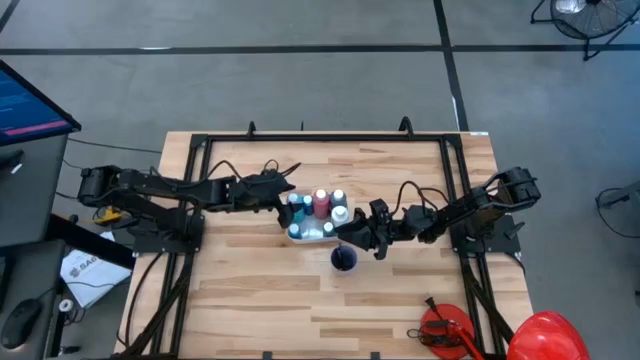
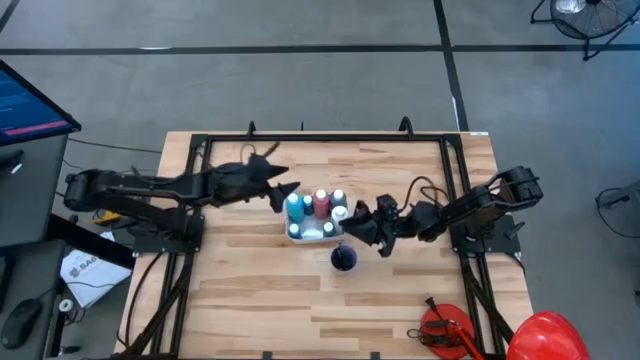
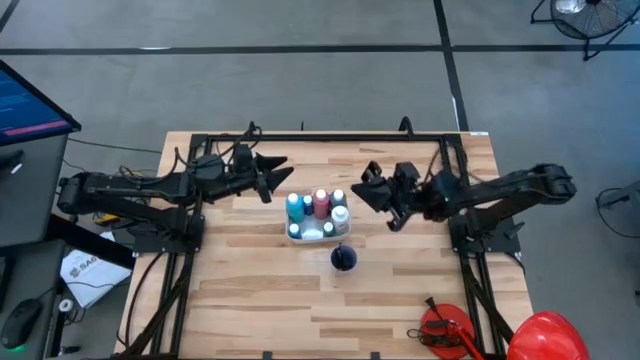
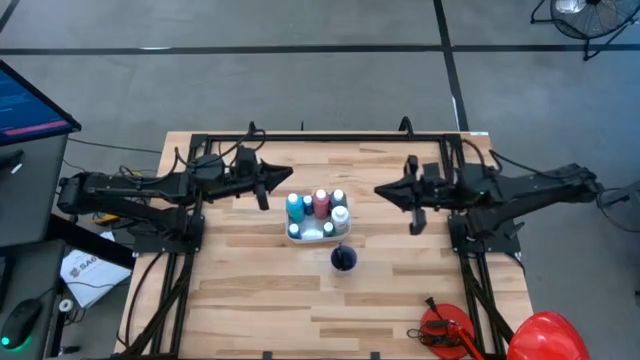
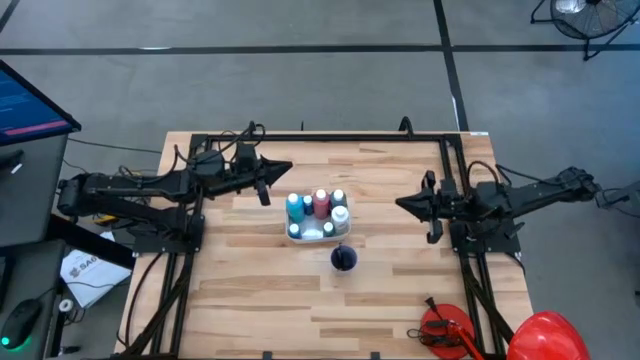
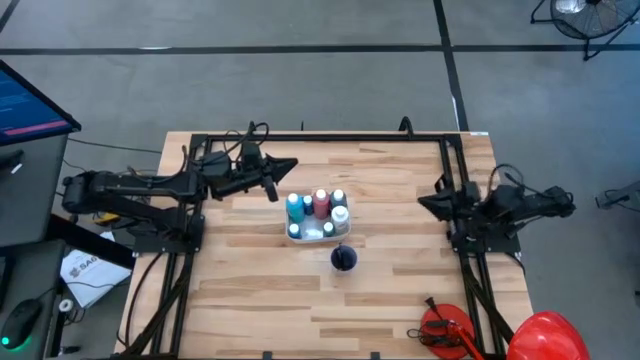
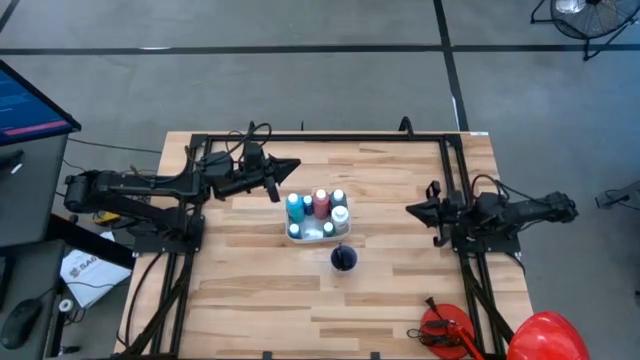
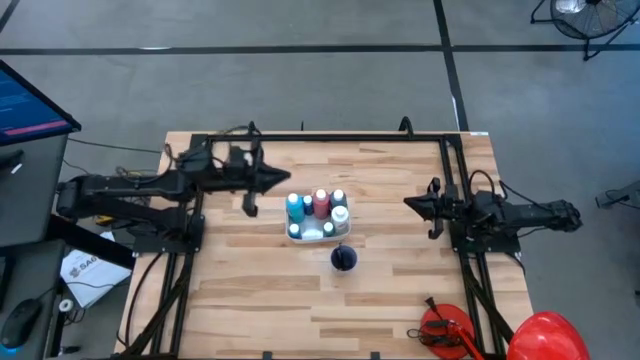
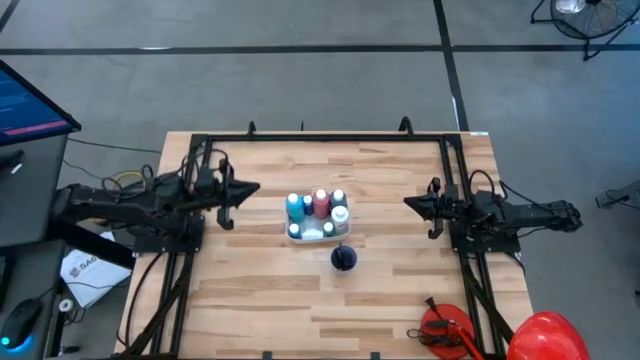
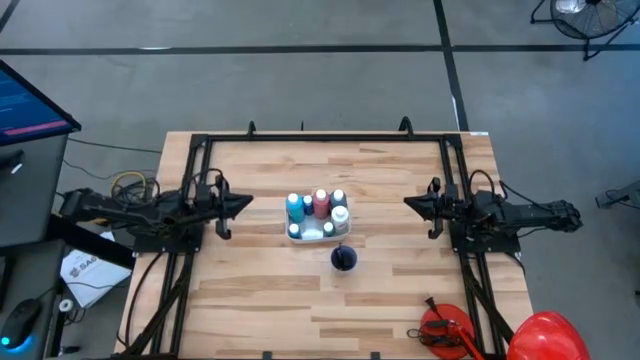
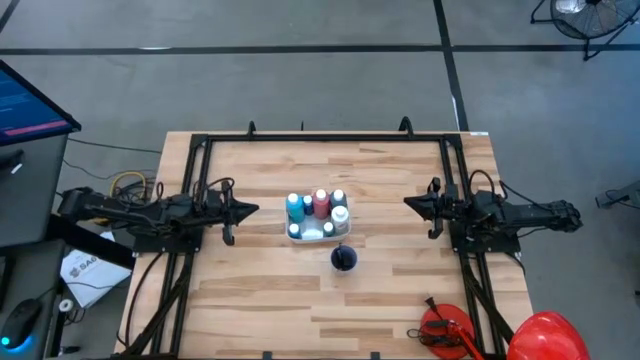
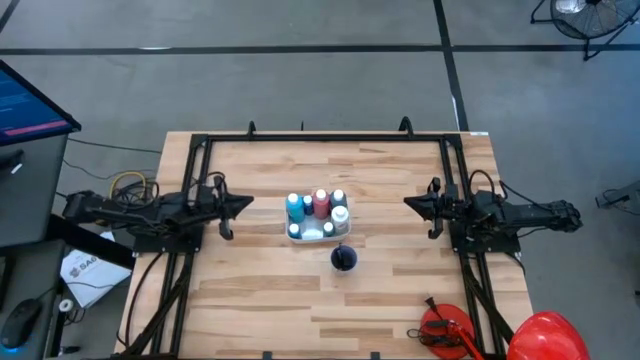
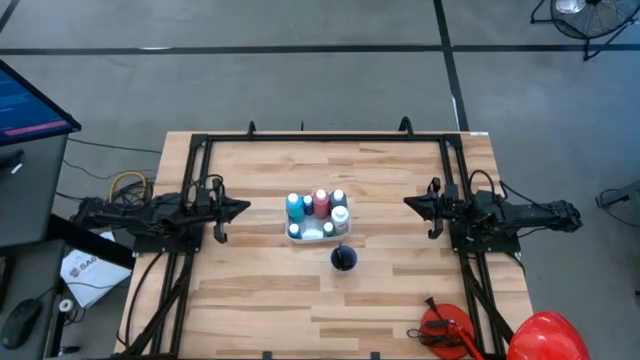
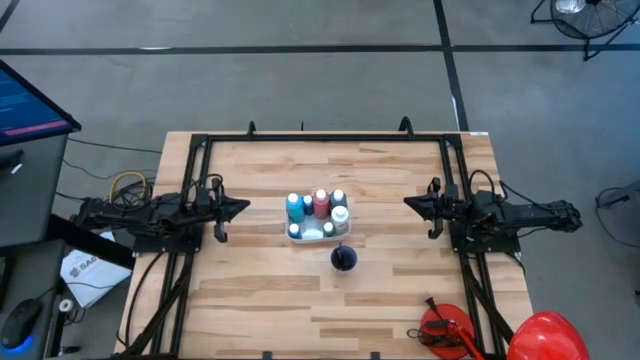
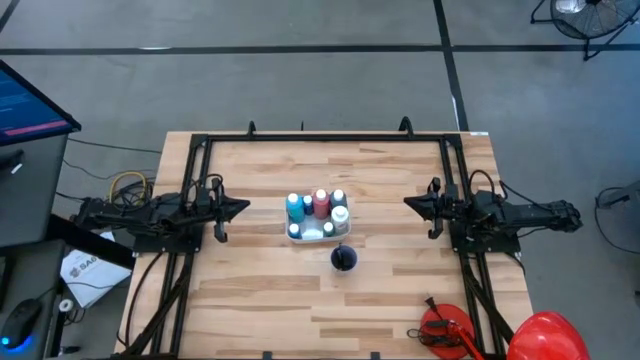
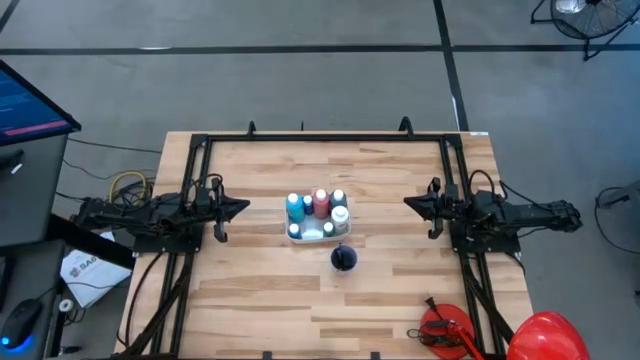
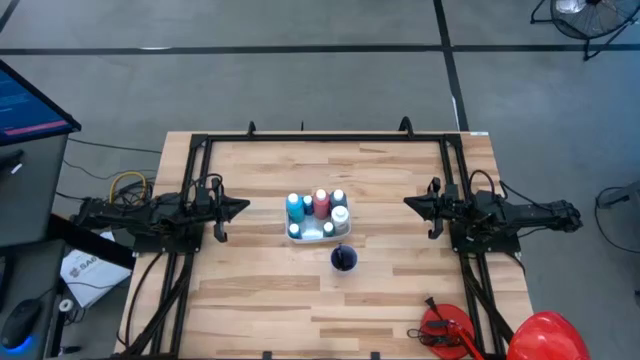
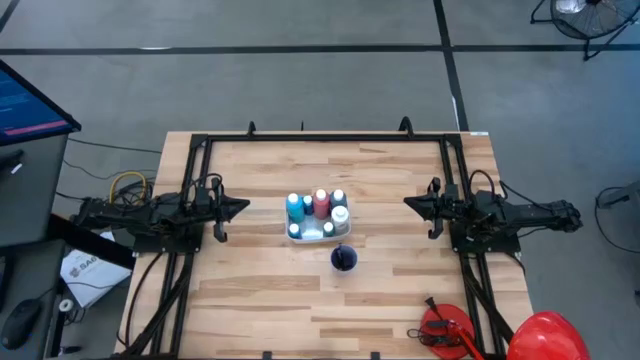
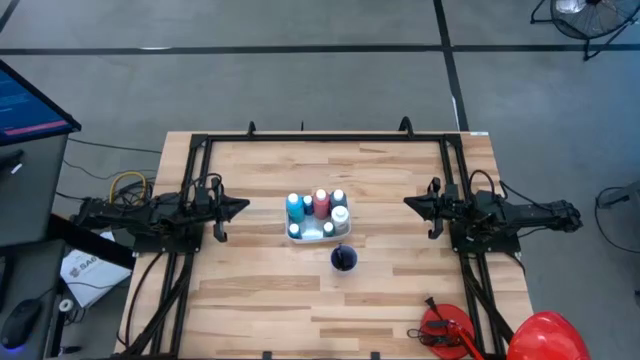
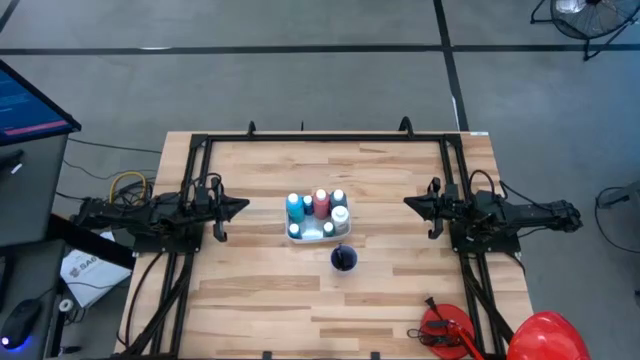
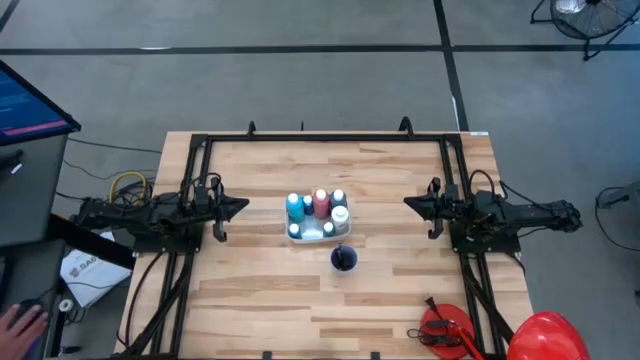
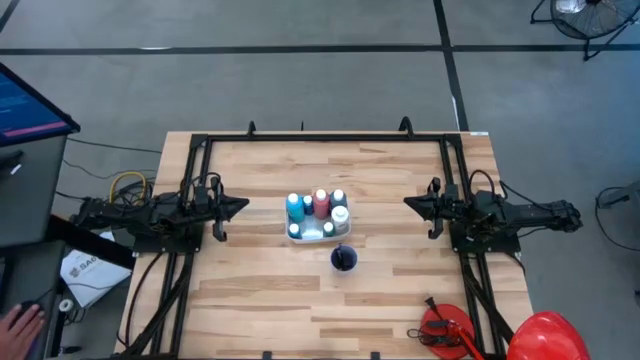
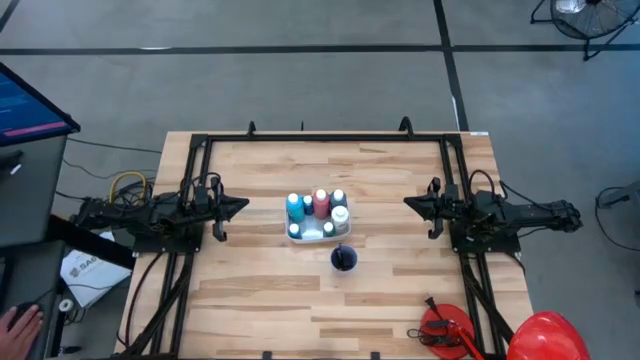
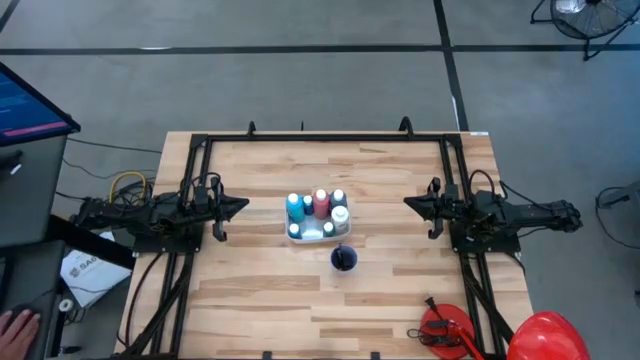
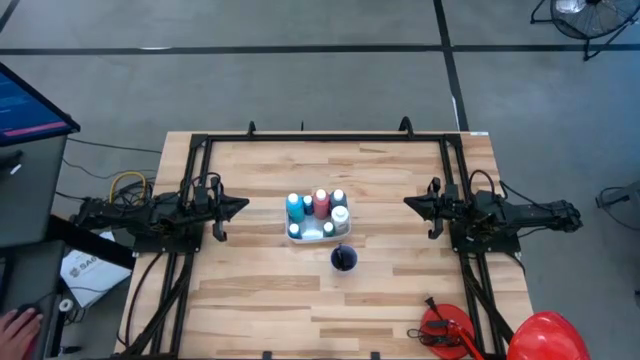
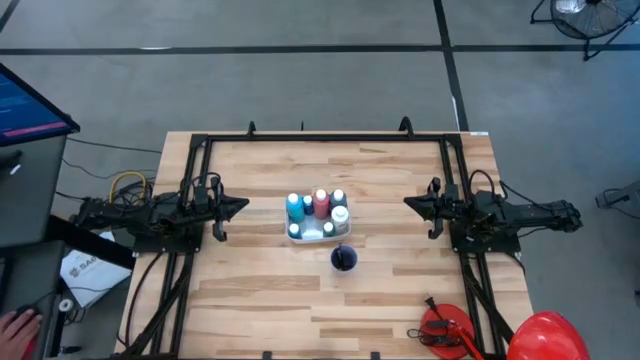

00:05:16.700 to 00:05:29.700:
Task: Pick & Place Paint Supplies
Return to Home Position

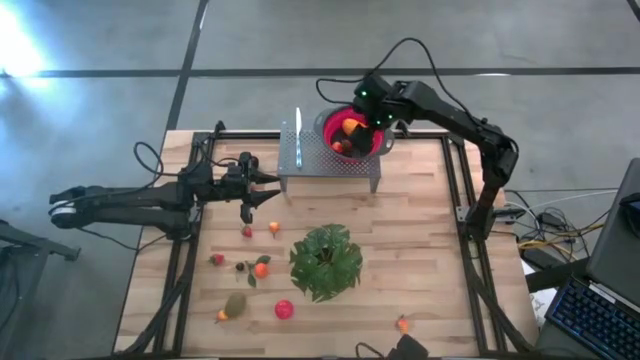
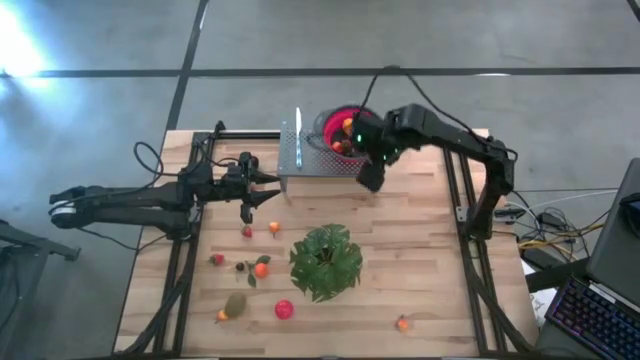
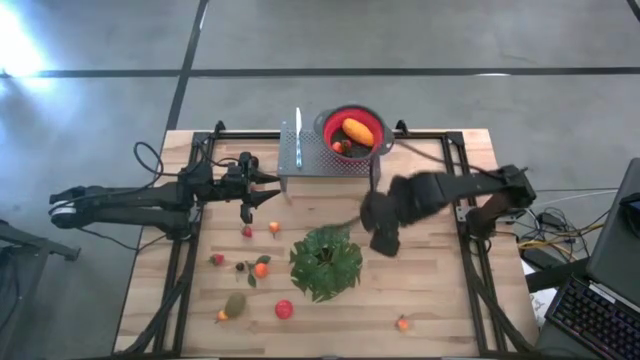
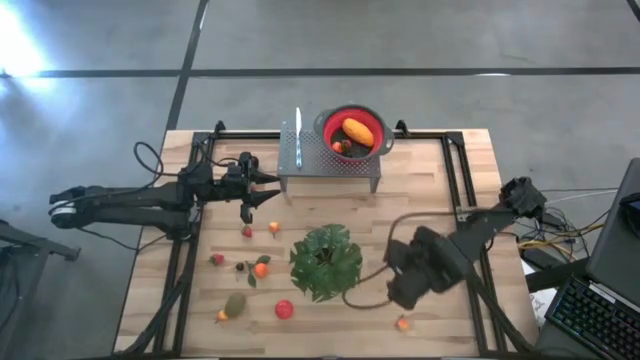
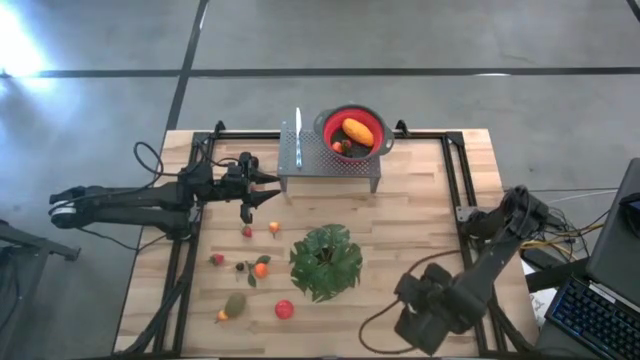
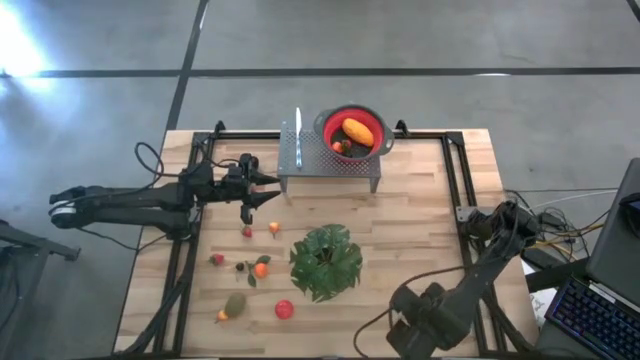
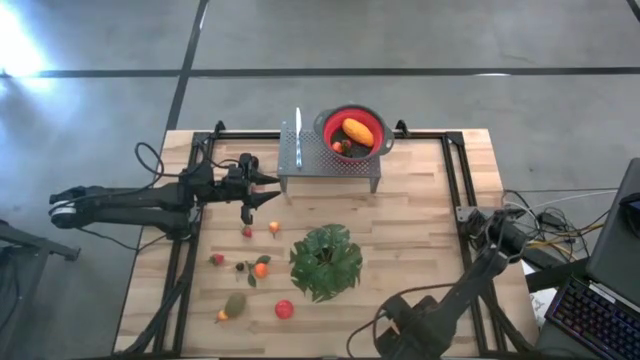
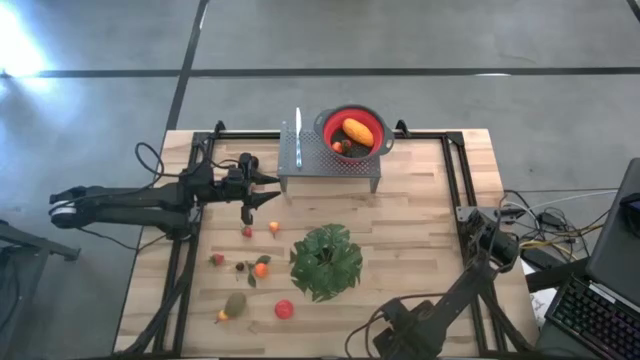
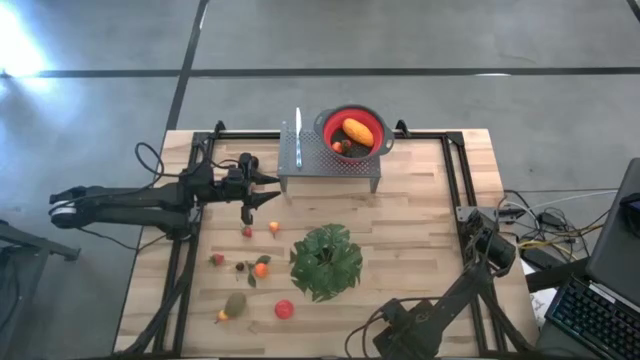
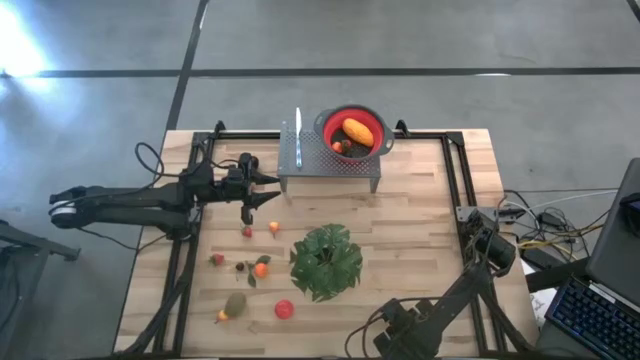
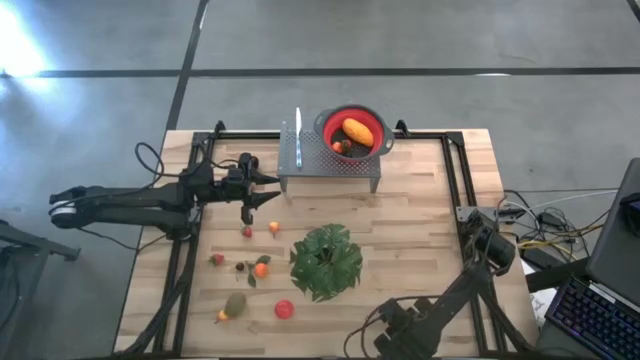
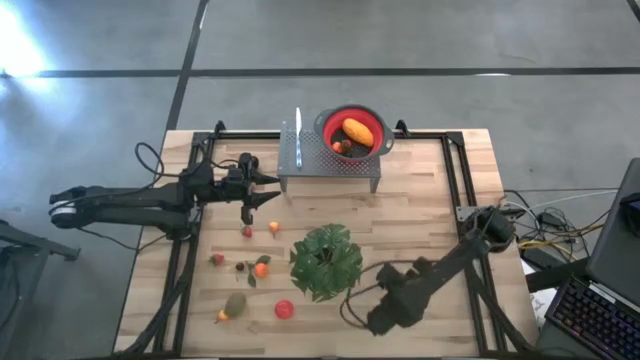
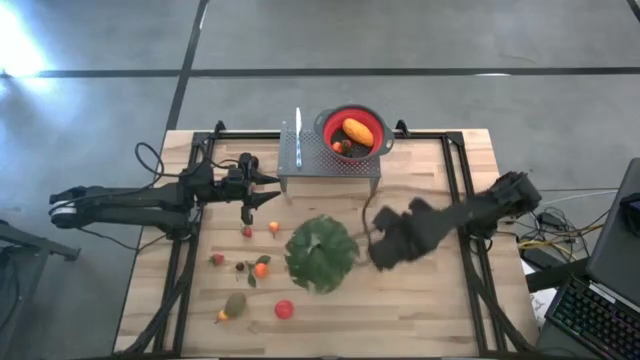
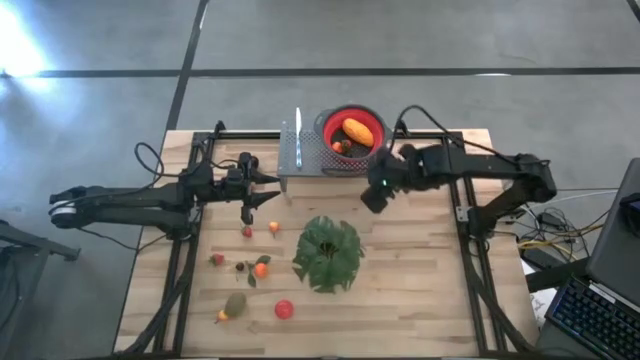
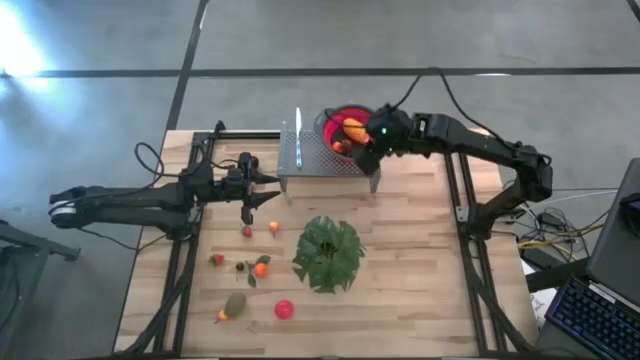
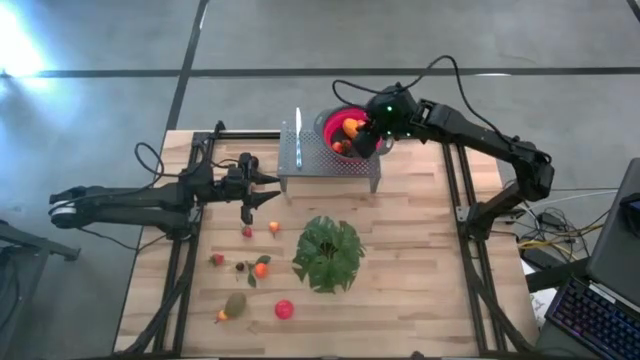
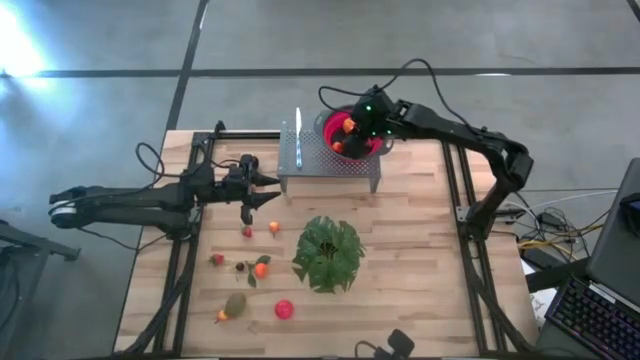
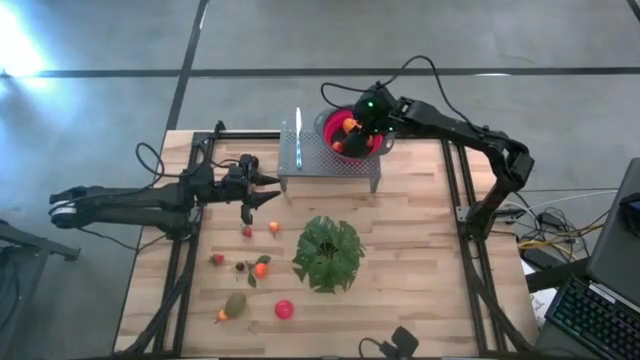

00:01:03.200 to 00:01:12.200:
Task: Pick & Place Fruit
Put the orange pear into the red strainer bowl on the shelf
